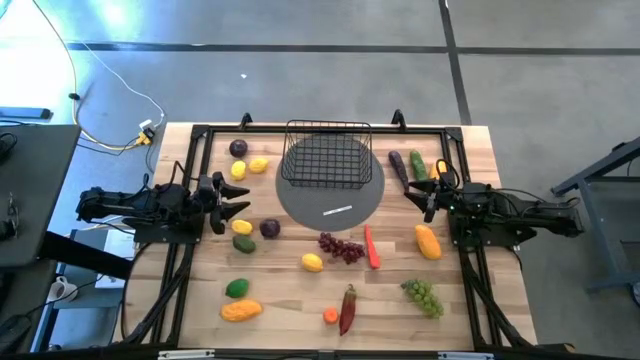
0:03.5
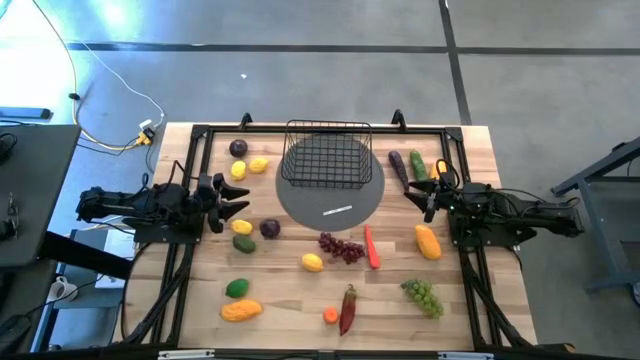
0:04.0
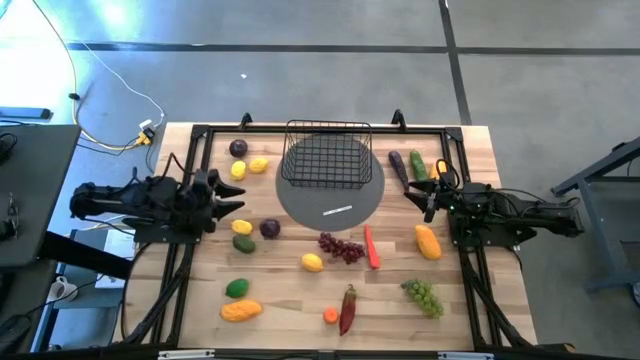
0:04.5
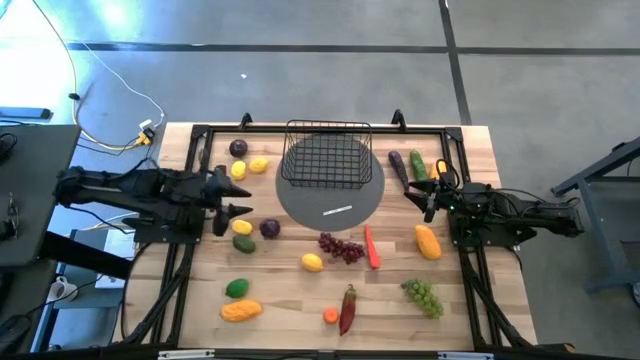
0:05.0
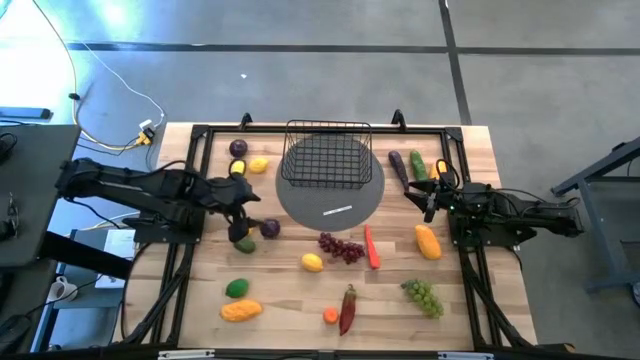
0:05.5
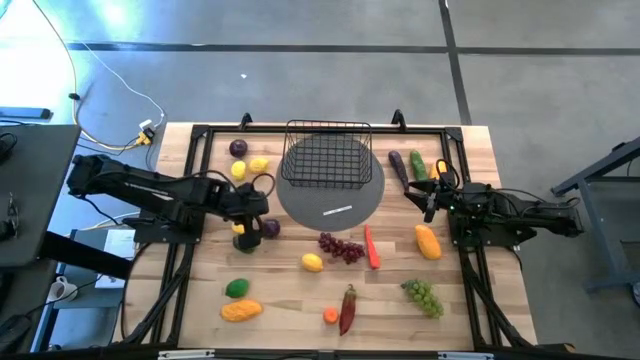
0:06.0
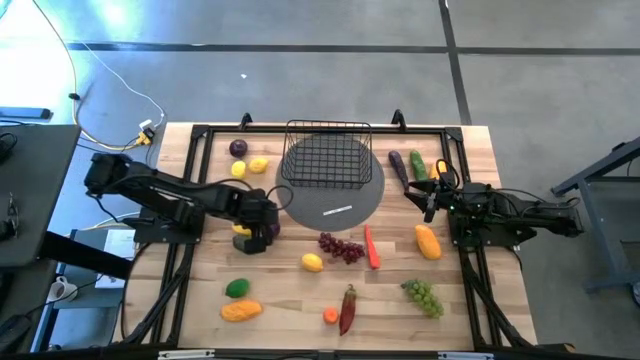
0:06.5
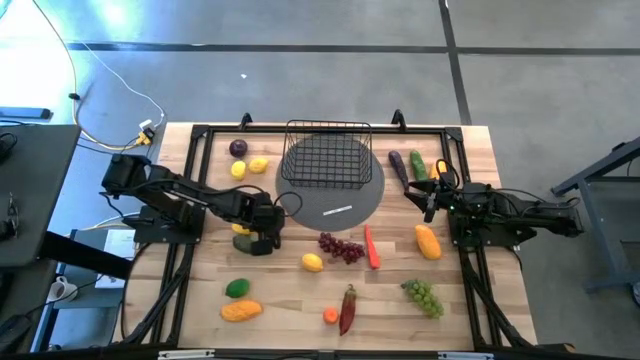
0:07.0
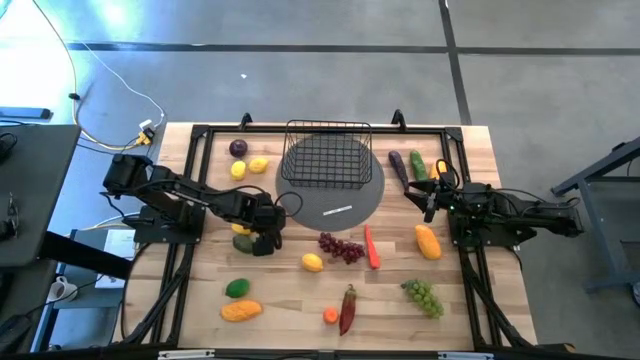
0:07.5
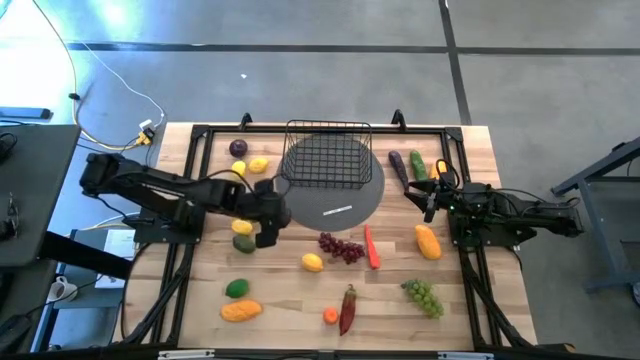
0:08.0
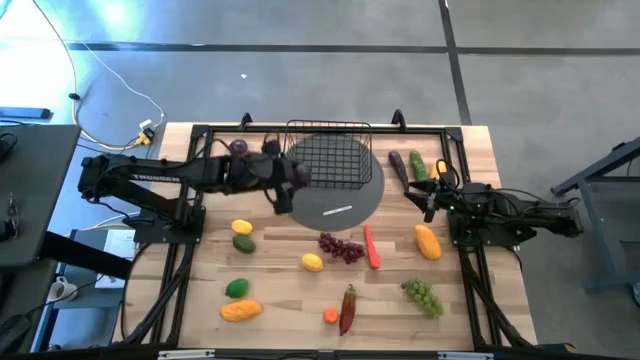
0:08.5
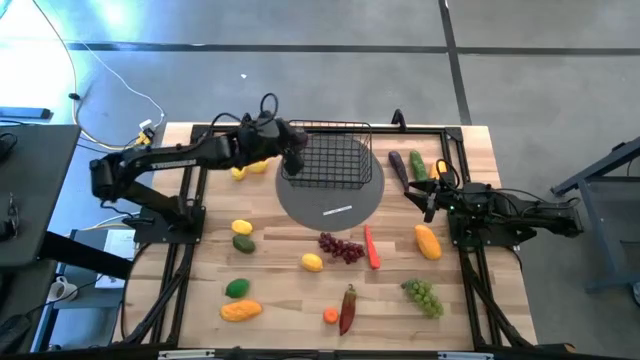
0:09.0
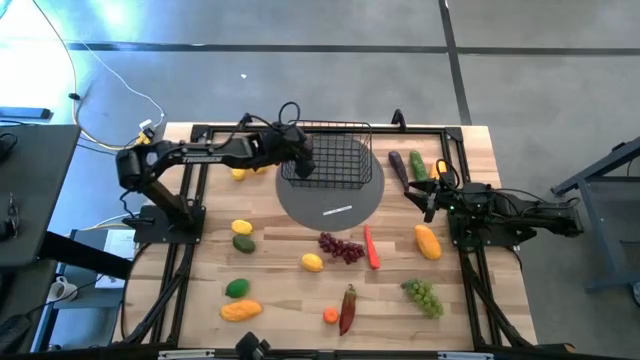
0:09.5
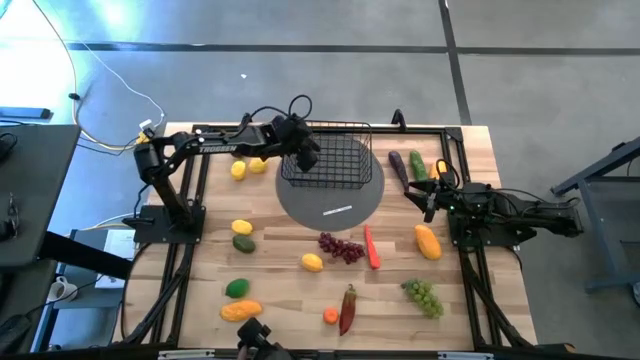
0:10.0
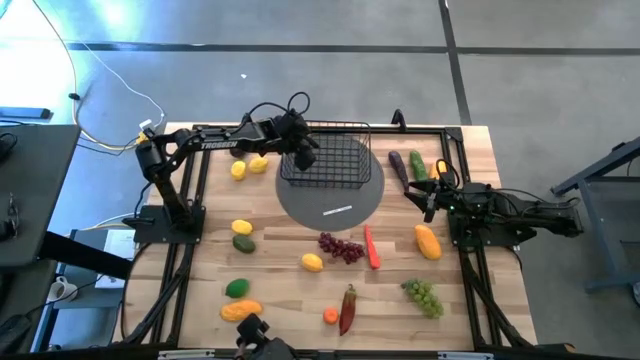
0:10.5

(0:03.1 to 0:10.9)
Task: Build produce basket
Put the bottom purple onion into the black wire basket

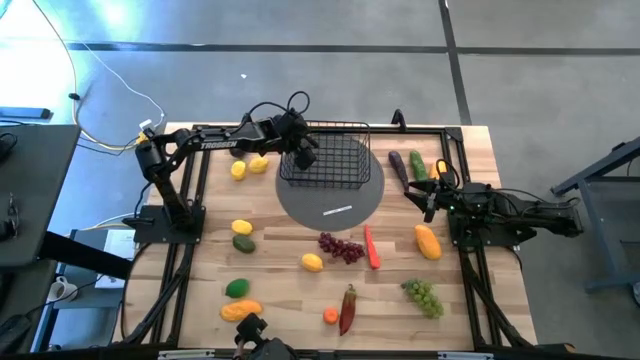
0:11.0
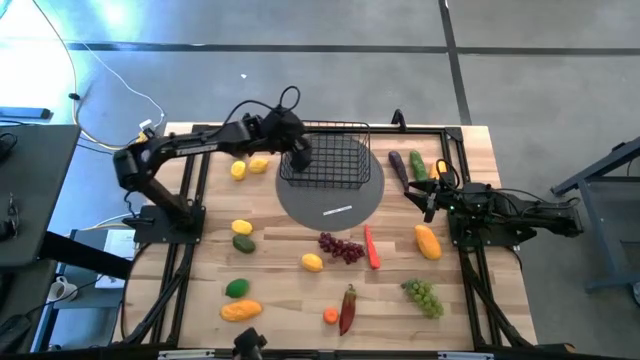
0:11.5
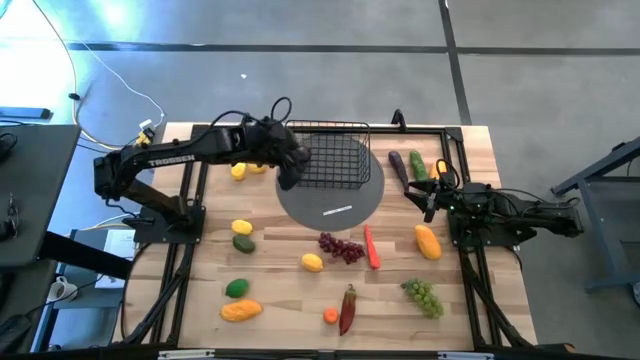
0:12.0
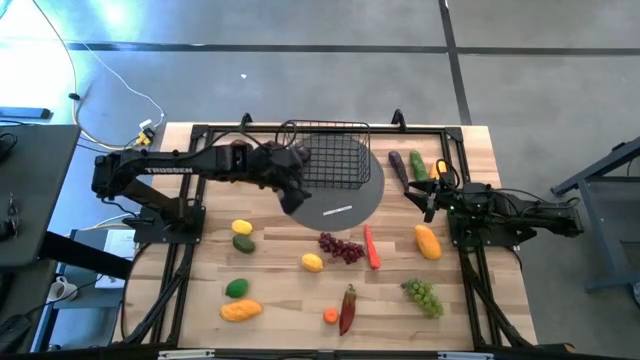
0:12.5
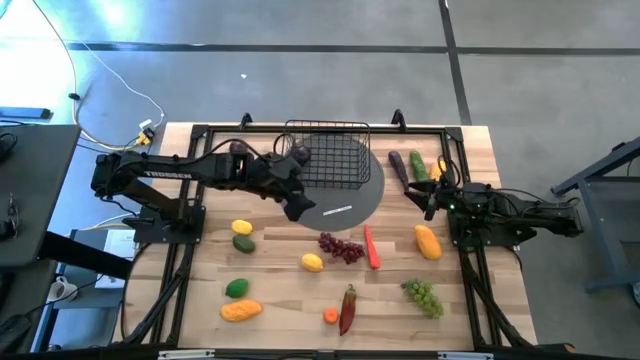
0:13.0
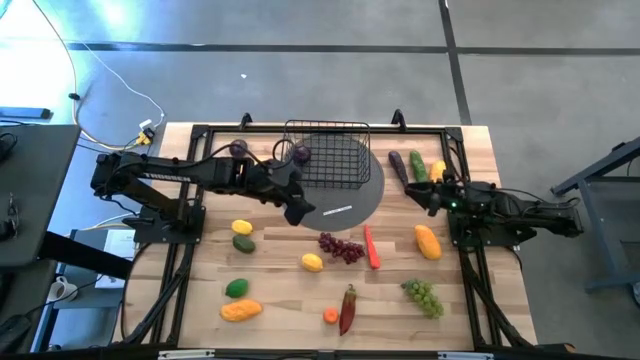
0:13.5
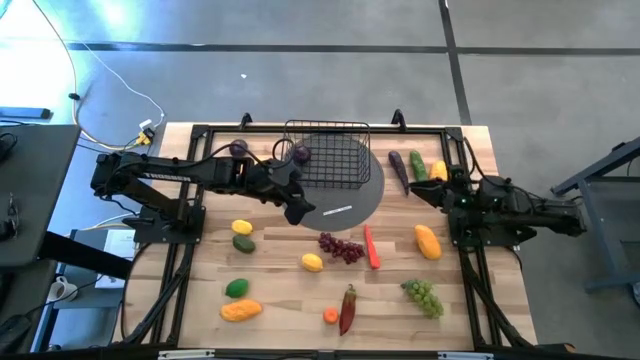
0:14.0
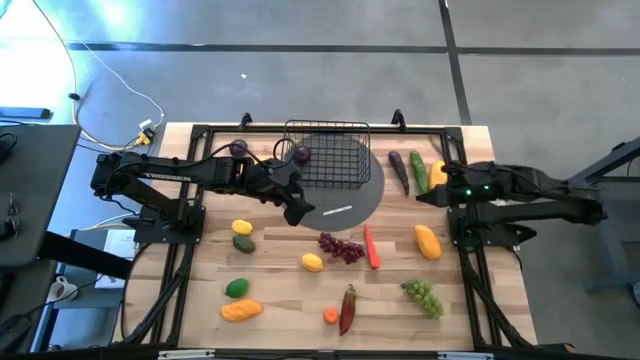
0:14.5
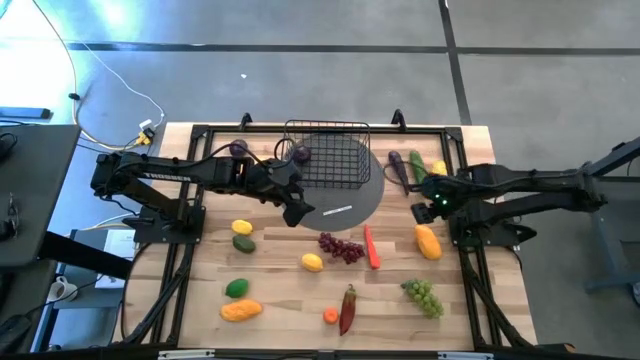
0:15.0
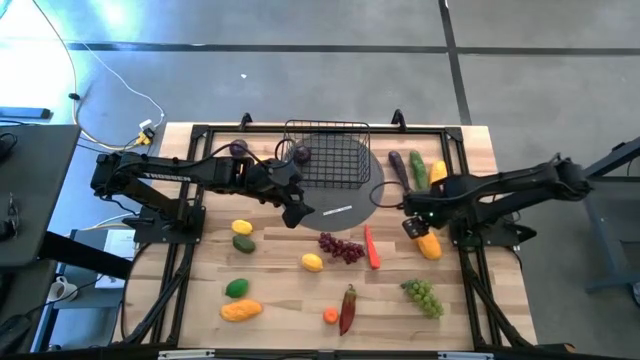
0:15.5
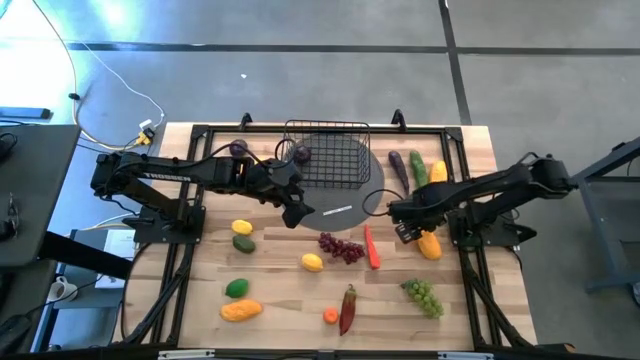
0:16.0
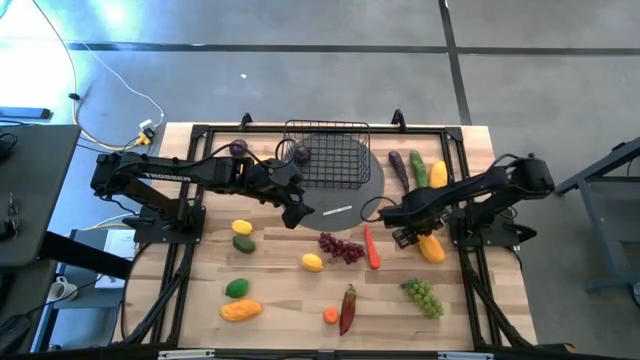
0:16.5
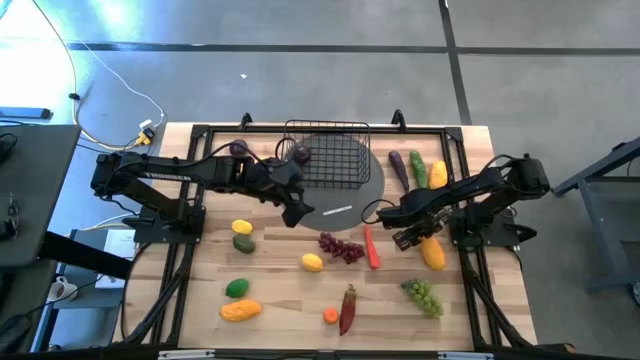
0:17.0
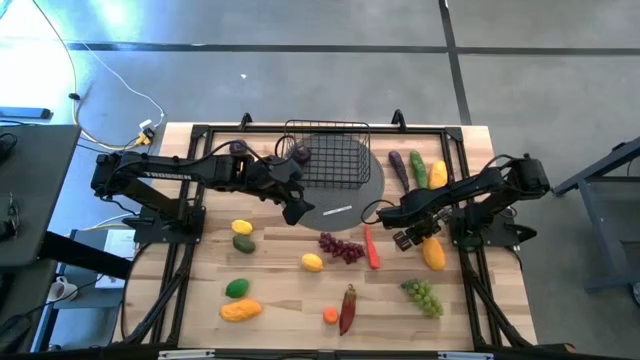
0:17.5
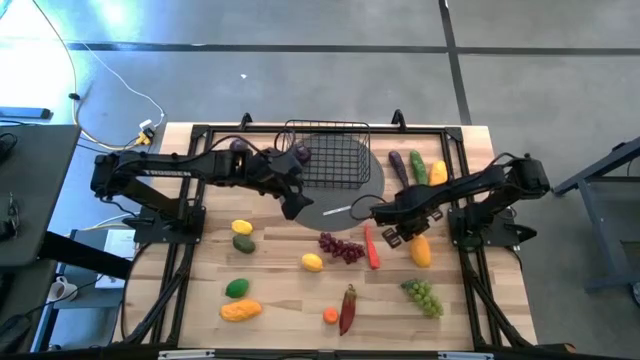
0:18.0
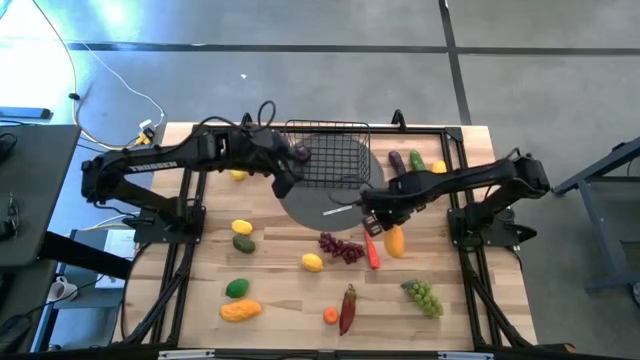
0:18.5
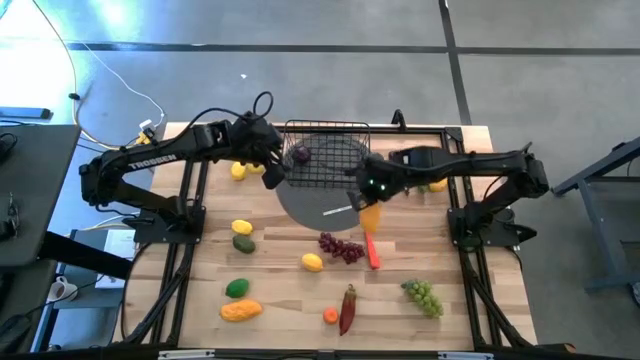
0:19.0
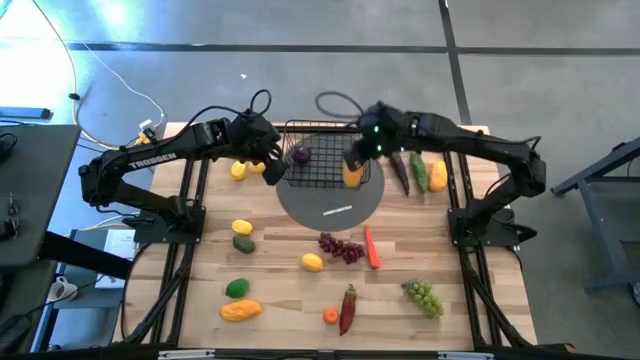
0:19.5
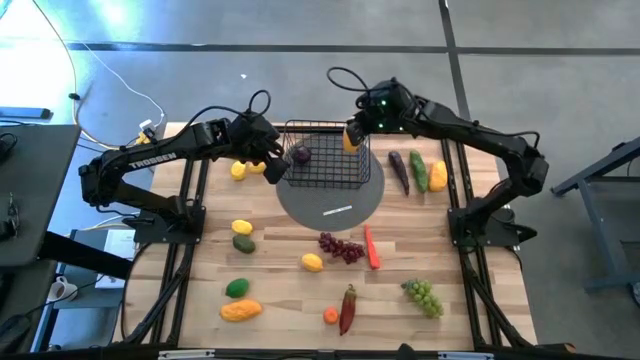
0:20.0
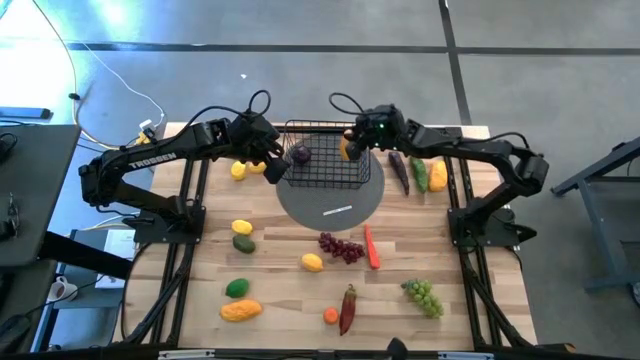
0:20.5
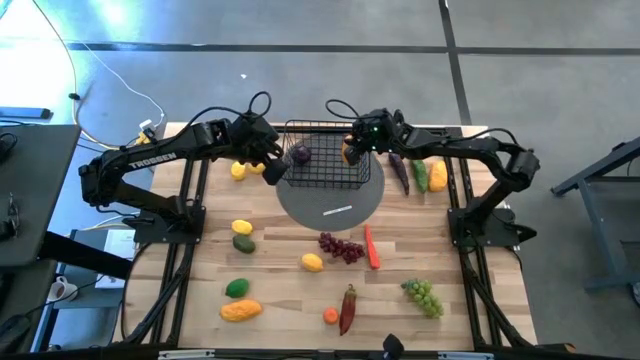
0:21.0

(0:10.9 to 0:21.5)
Put the middle yellow mango into the black wire basket

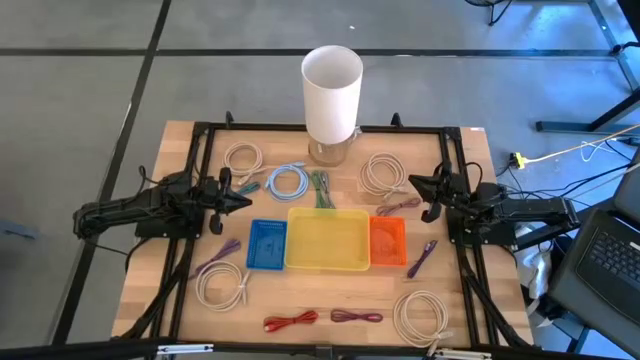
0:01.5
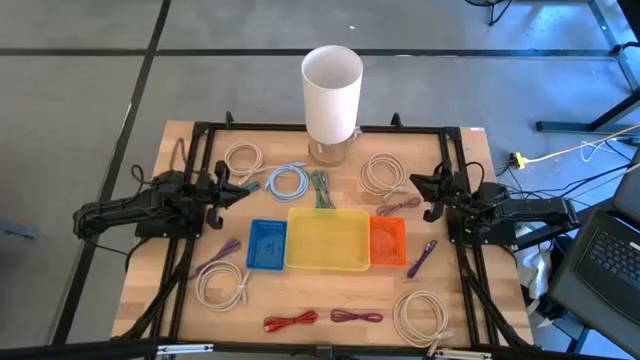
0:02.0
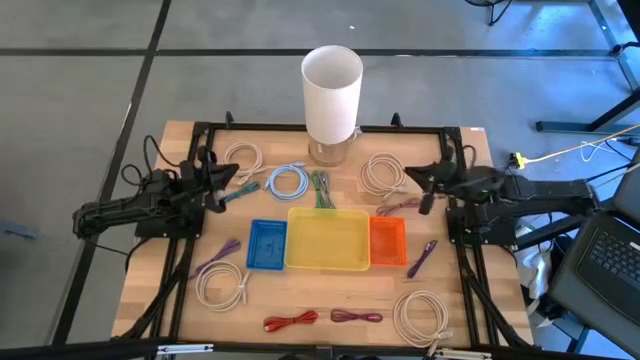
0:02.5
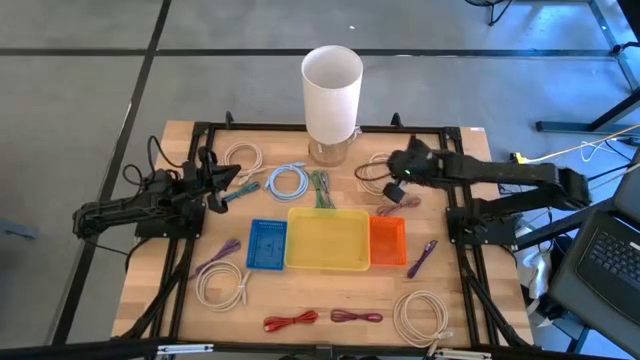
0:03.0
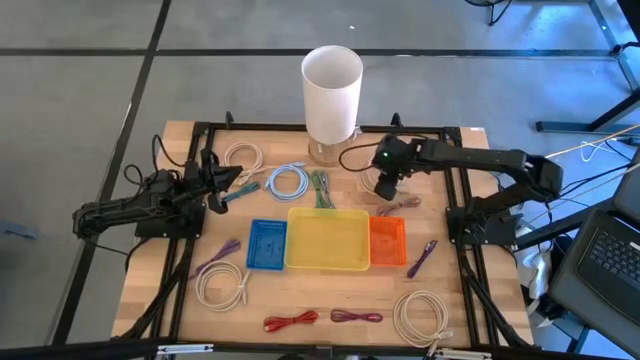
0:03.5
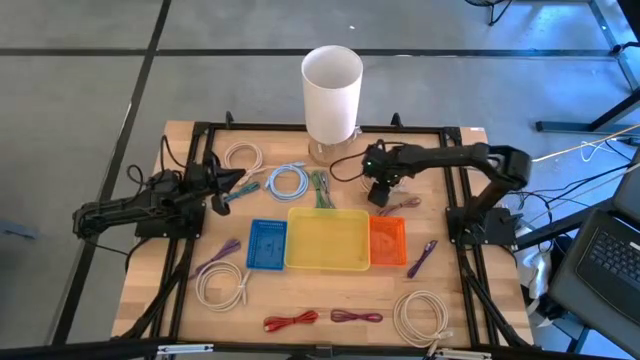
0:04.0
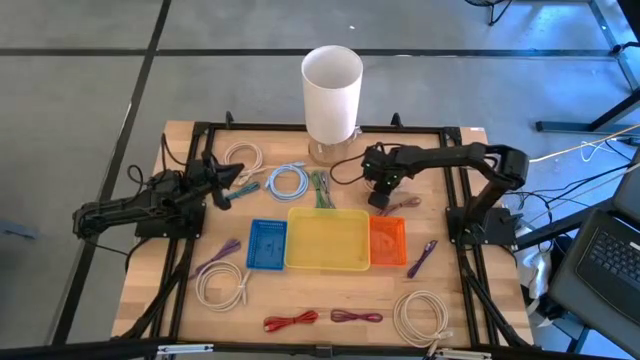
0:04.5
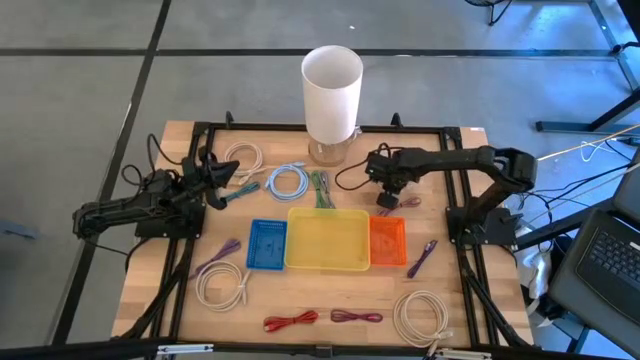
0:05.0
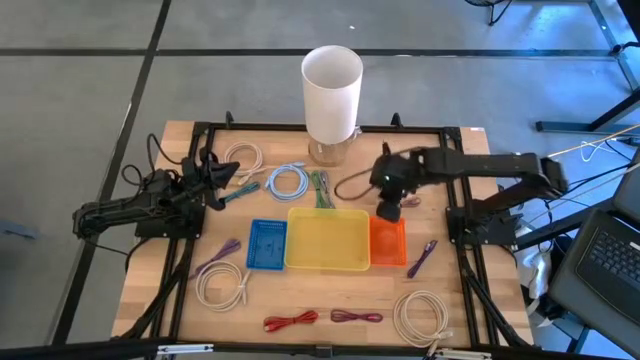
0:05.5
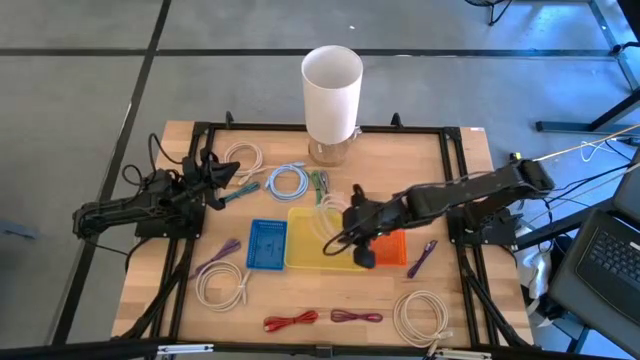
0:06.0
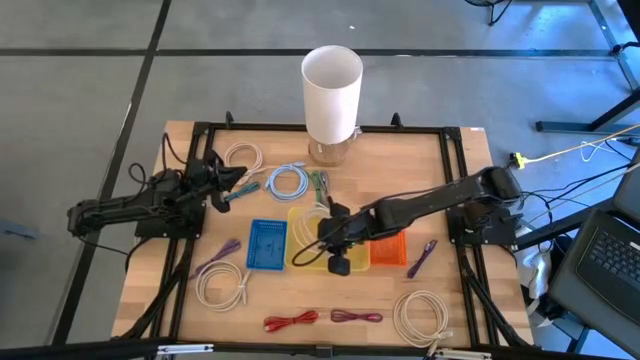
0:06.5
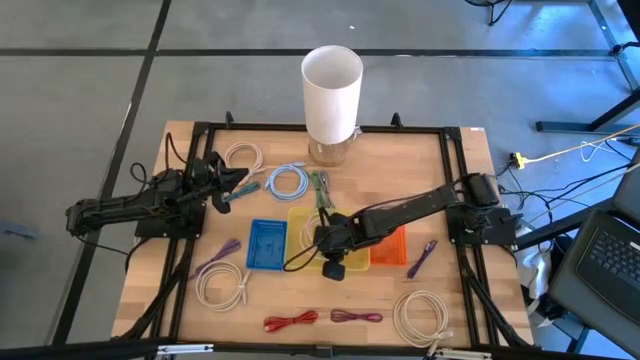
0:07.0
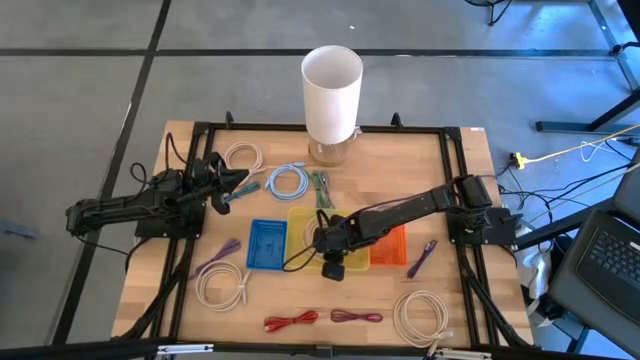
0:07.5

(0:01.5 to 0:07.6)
Task: Pick & Place USB Port
Put the top right white charger cable into the yellow bin
